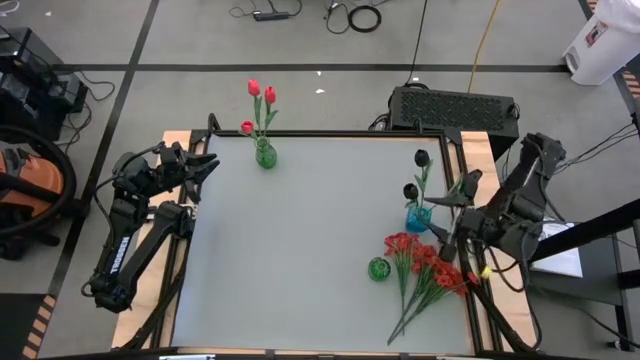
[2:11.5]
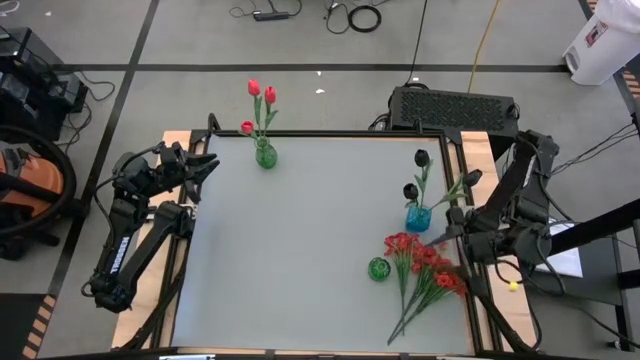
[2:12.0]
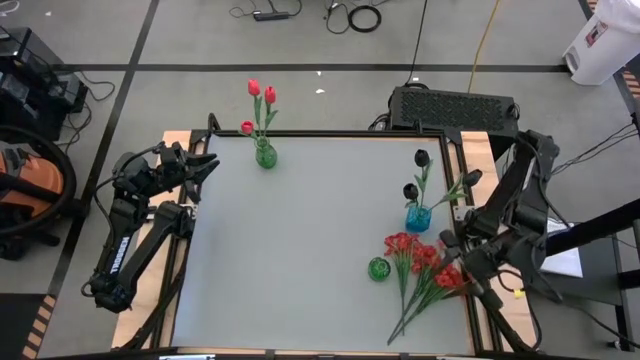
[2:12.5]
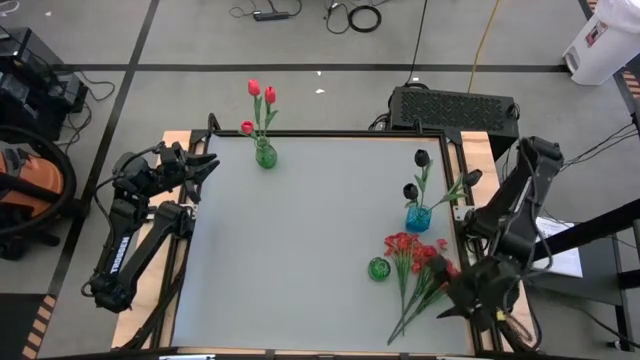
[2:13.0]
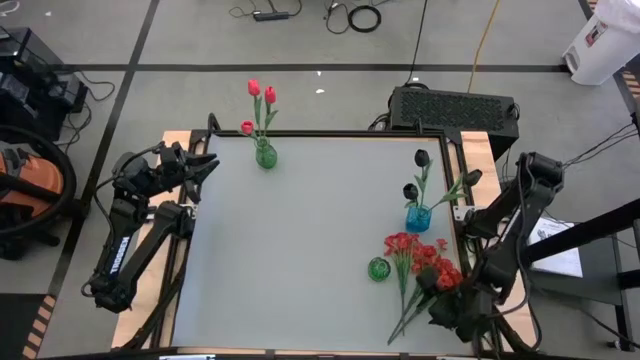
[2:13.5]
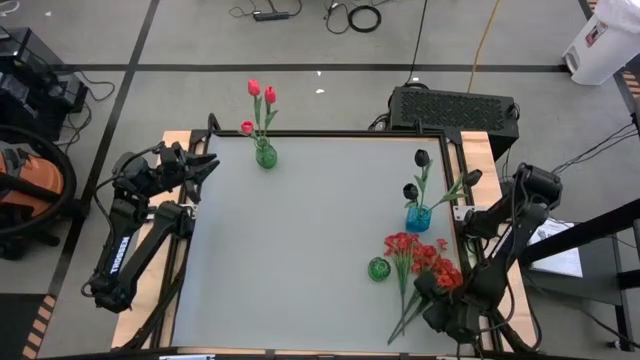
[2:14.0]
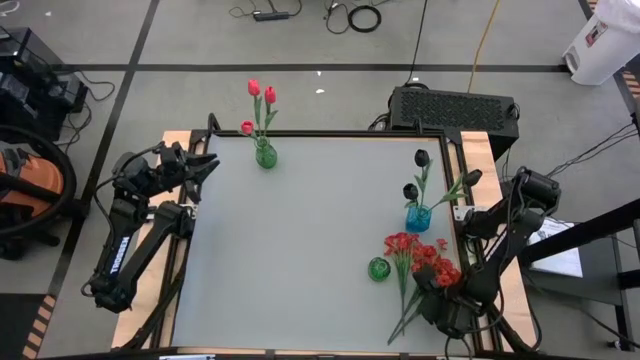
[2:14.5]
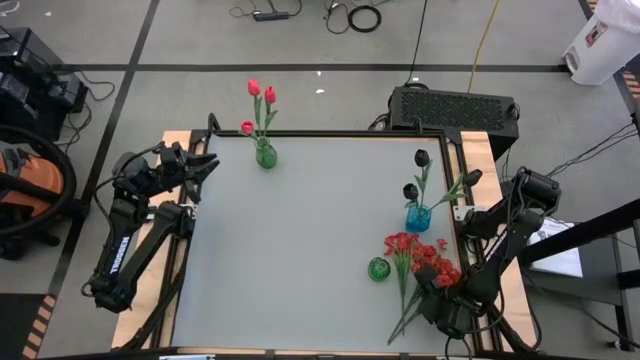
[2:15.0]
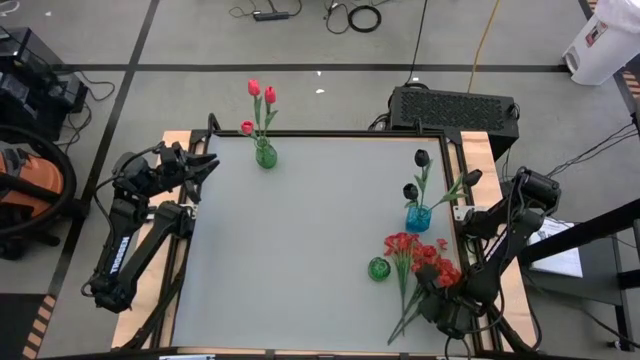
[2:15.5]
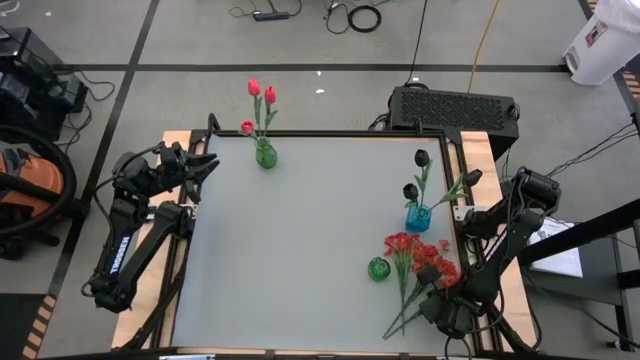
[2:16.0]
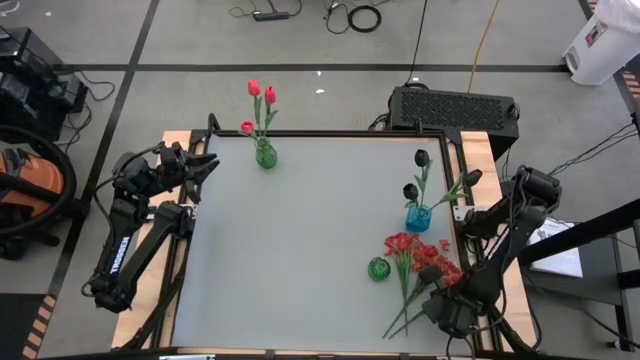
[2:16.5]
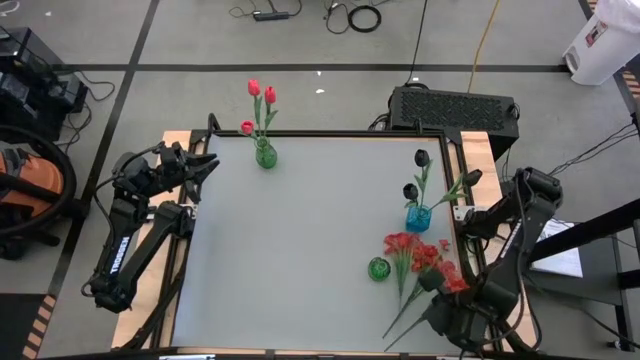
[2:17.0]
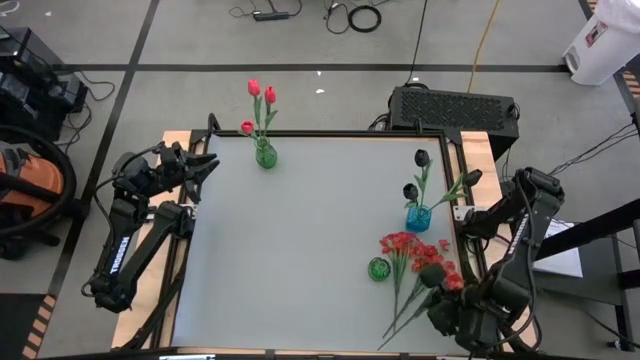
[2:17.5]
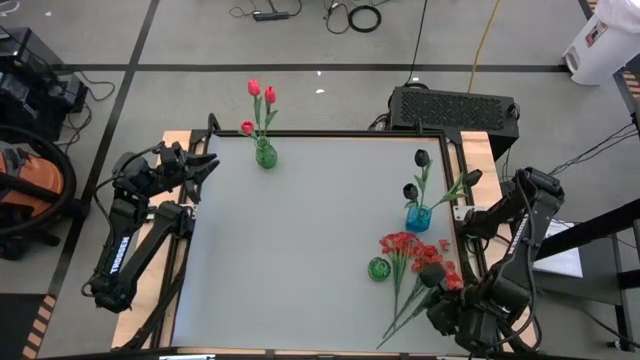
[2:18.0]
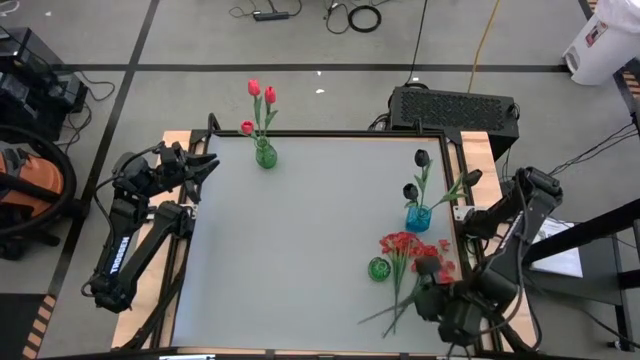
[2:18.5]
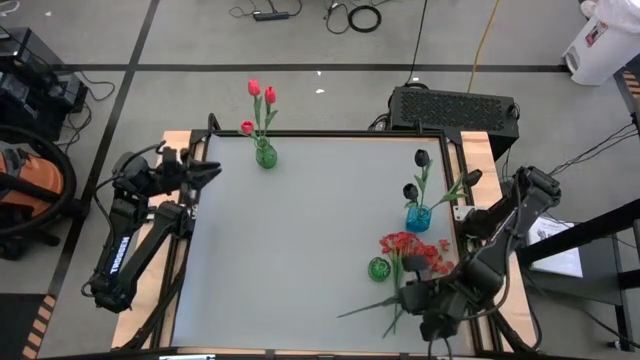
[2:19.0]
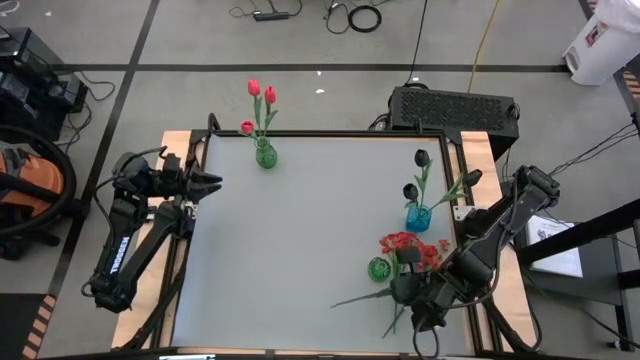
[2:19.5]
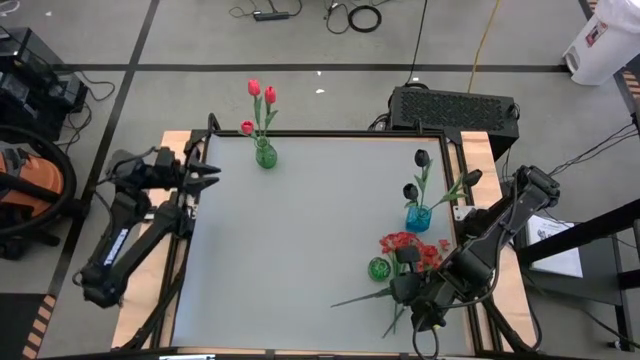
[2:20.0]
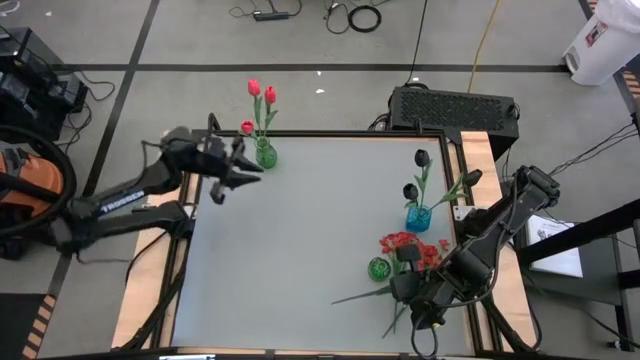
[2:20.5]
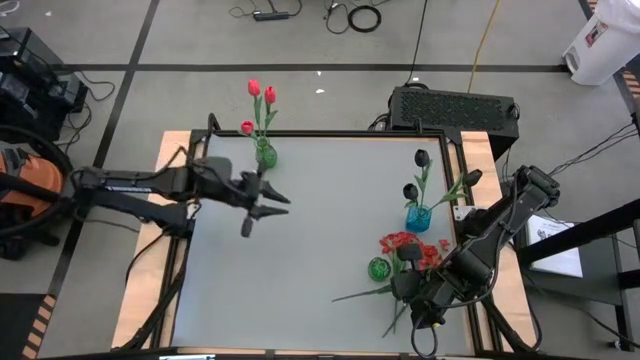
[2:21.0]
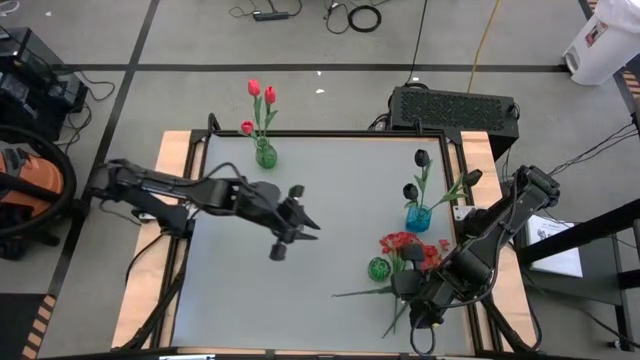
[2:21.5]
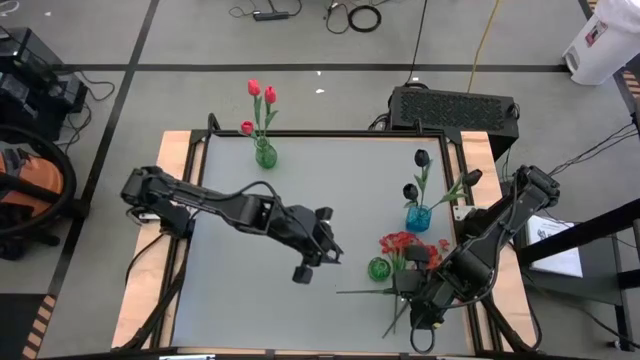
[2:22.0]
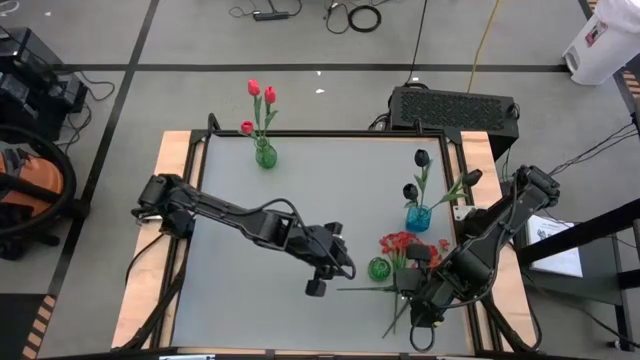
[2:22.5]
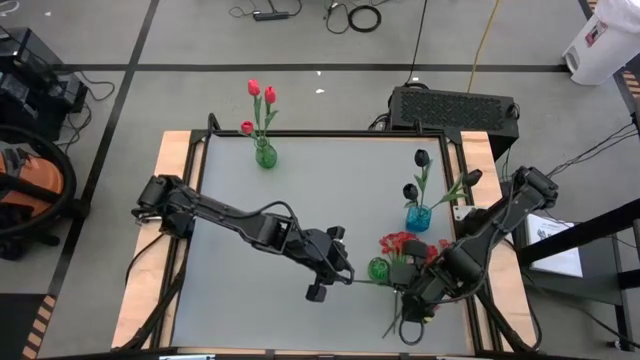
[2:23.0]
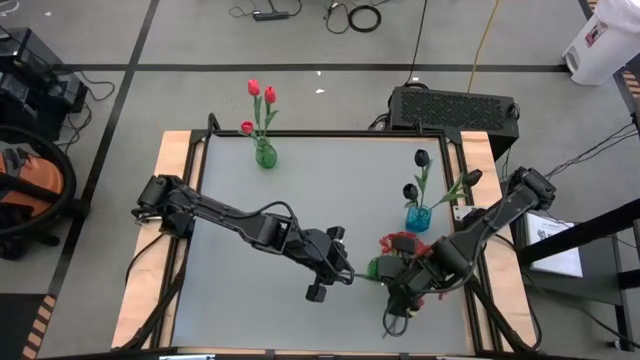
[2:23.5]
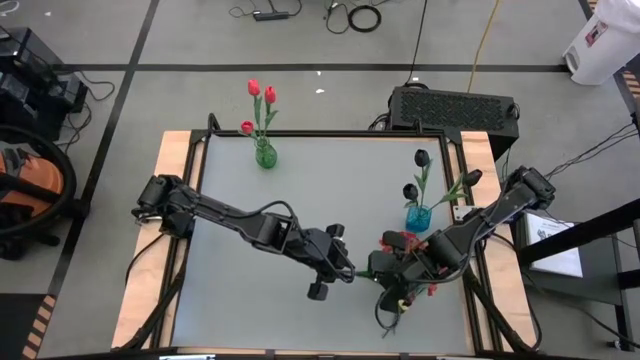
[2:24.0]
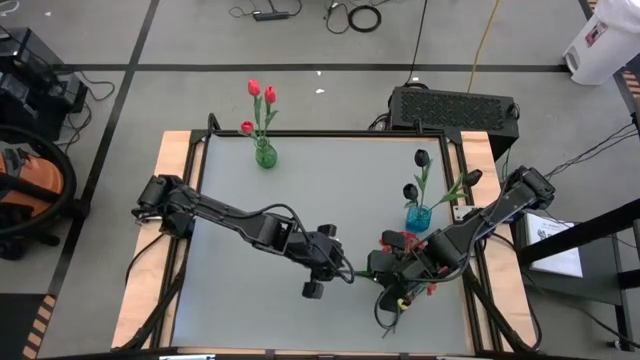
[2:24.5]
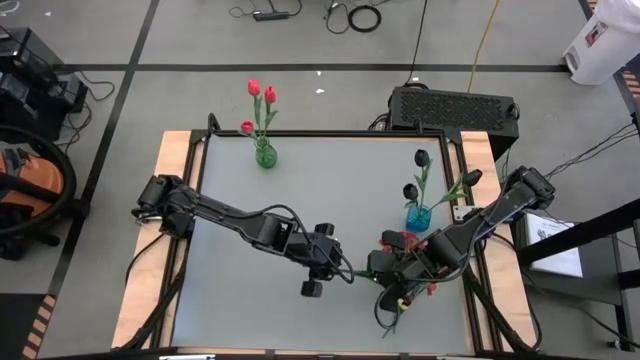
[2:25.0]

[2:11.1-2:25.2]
Task: Sort flowers into vase by color
Put the right red flowers into the bottom green vase

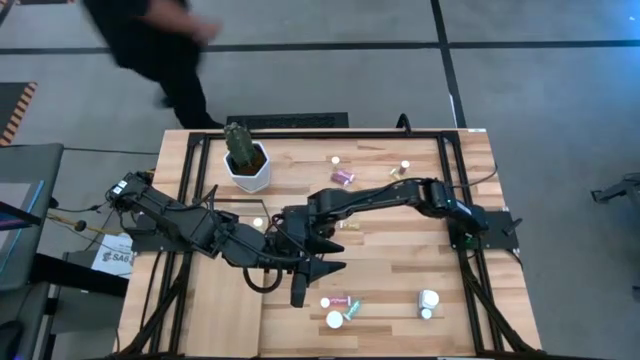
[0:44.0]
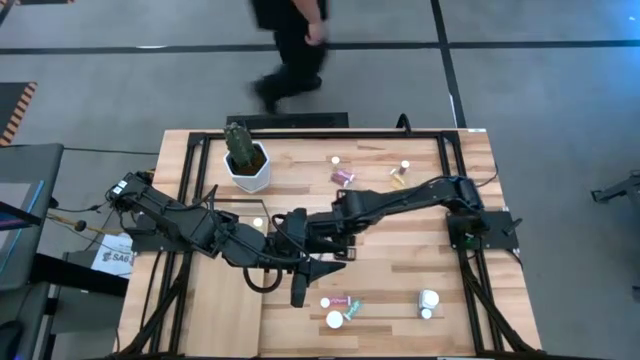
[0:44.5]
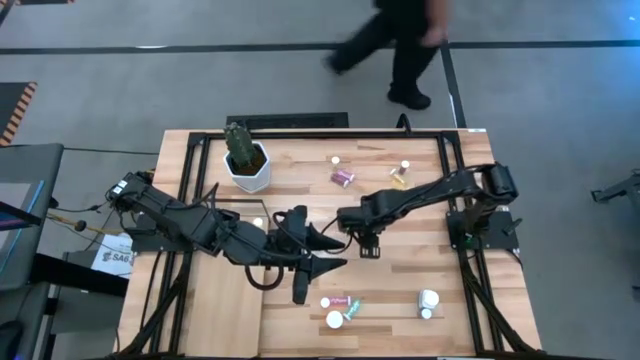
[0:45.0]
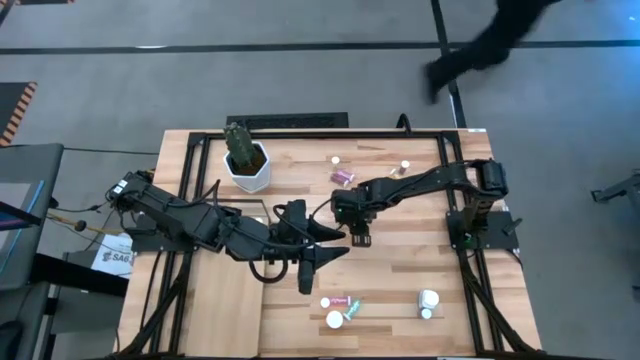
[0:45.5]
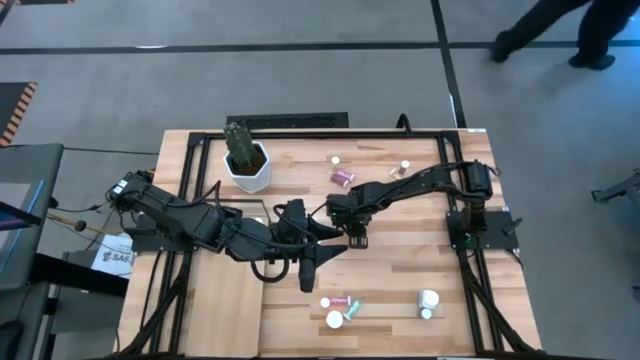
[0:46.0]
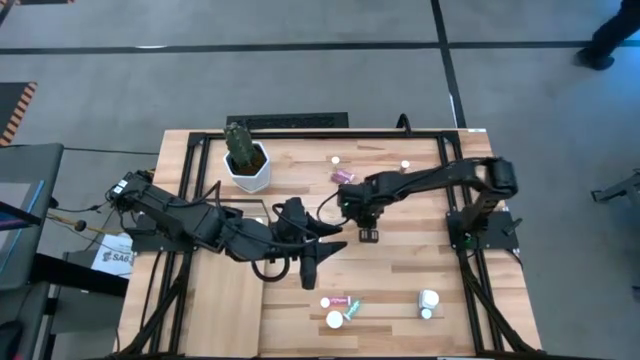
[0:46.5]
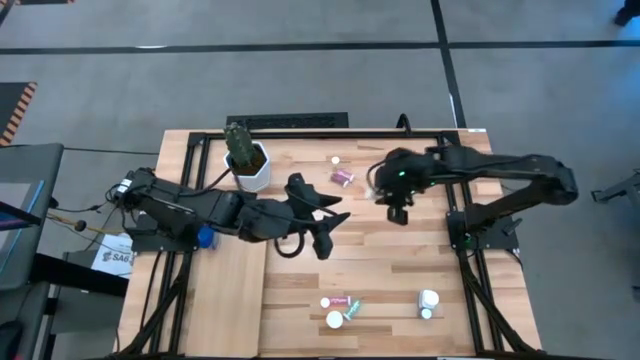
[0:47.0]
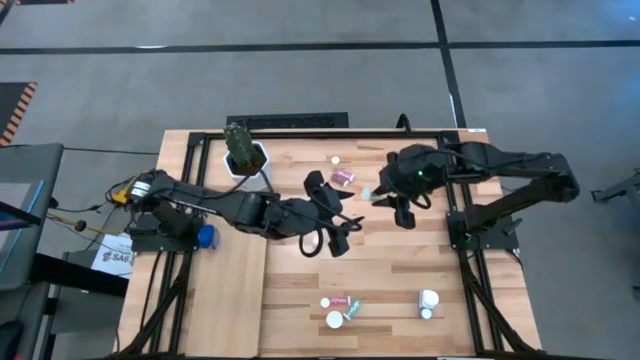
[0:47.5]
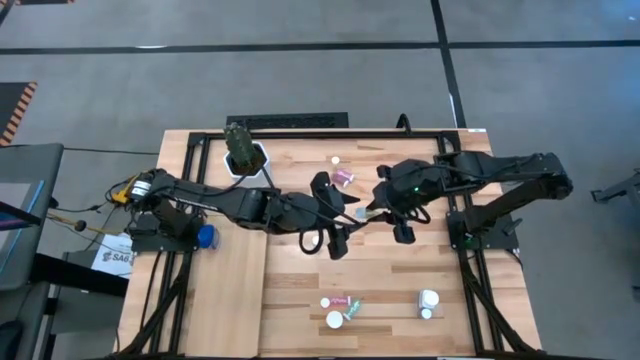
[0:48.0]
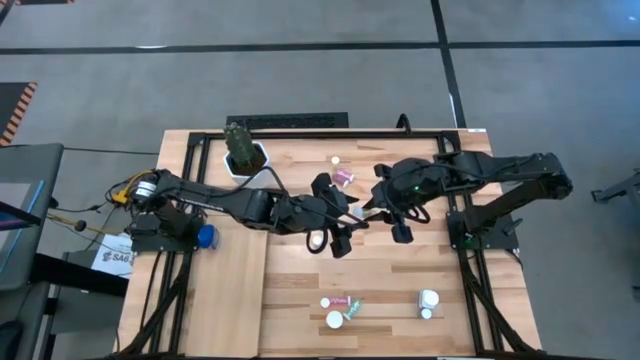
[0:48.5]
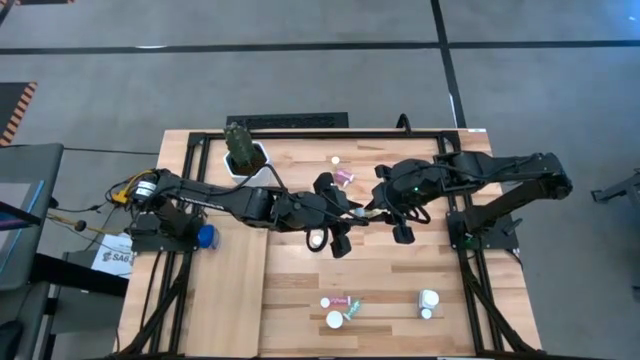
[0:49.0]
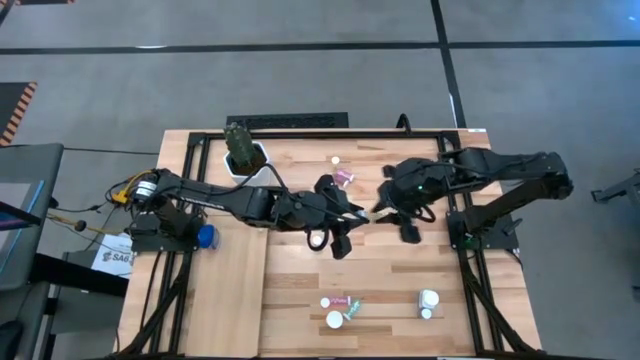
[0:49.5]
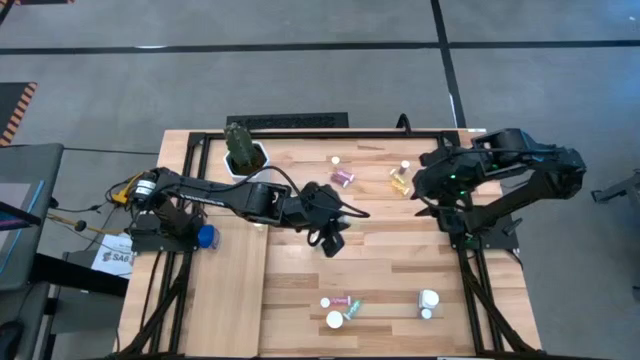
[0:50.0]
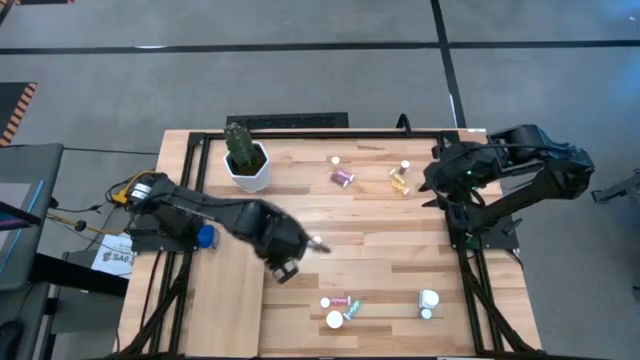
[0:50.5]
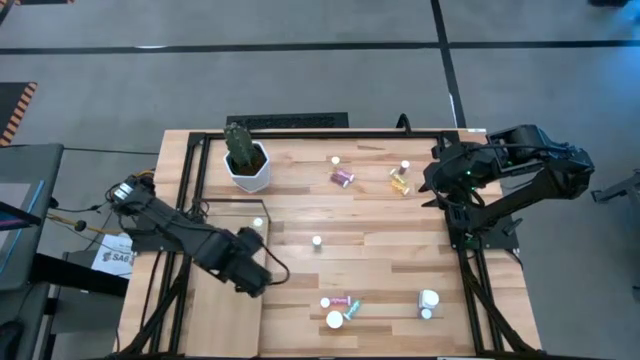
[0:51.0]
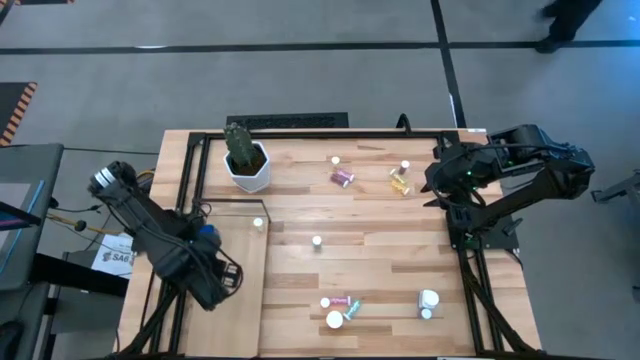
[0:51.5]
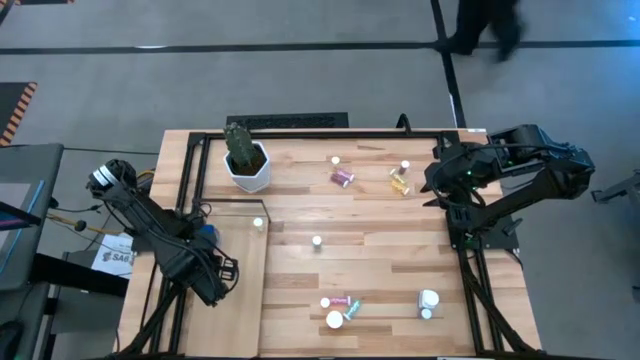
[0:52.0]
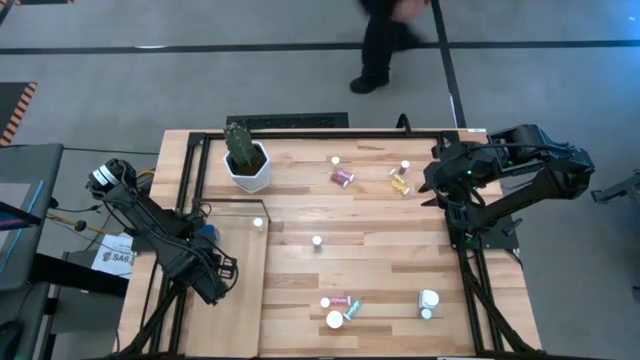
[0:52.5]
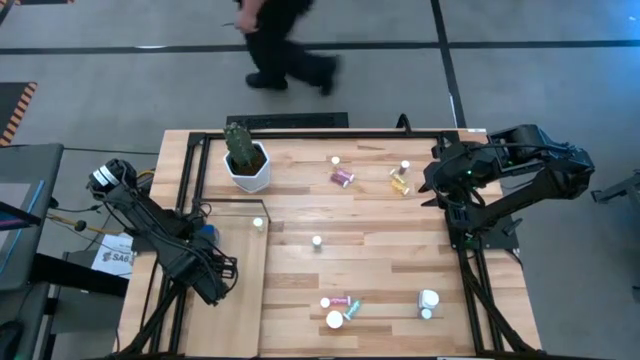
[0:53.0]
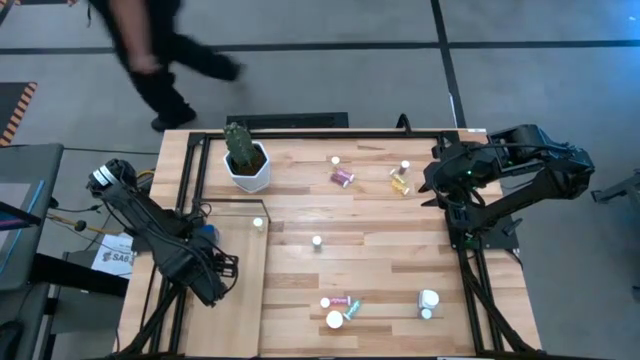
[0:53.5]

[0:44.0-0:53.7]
Task: Pick and place medicine bottles onto shelf by color
Put the yellow pill bottle on the shelf
